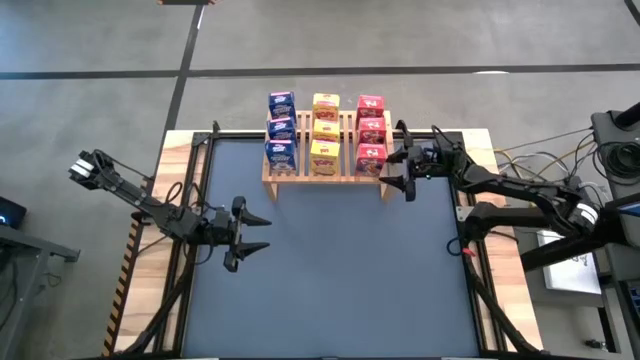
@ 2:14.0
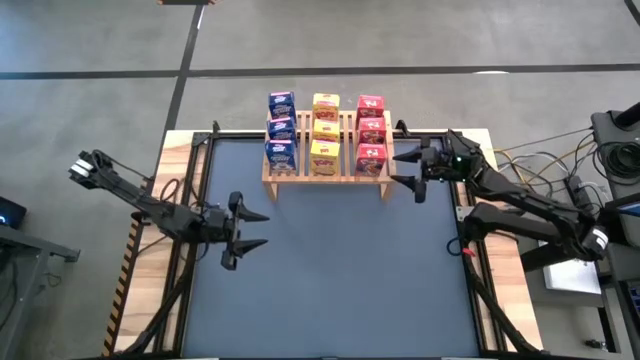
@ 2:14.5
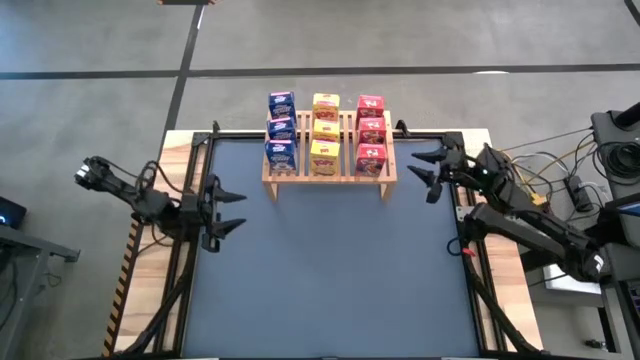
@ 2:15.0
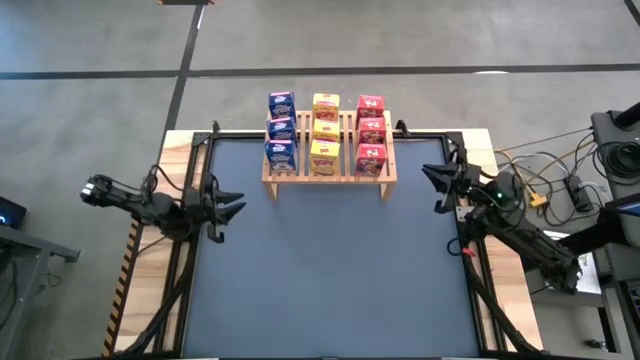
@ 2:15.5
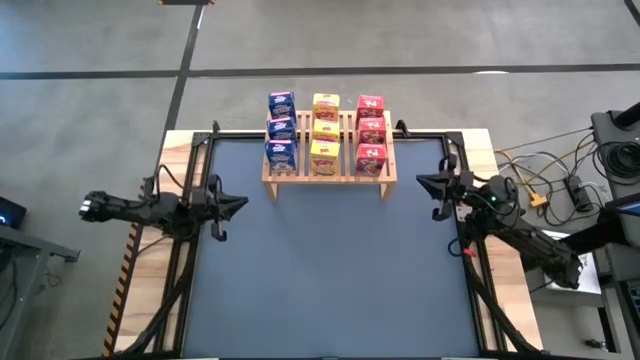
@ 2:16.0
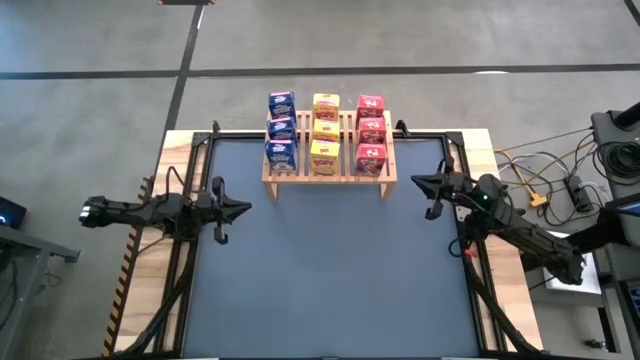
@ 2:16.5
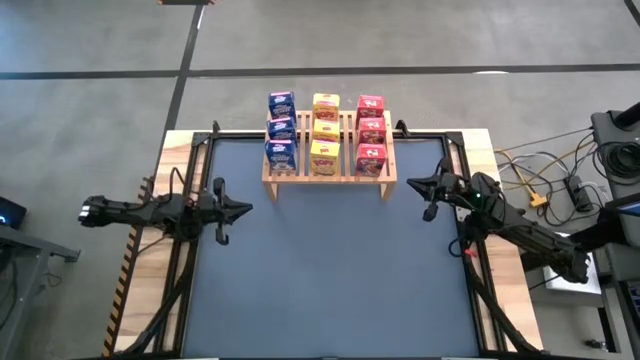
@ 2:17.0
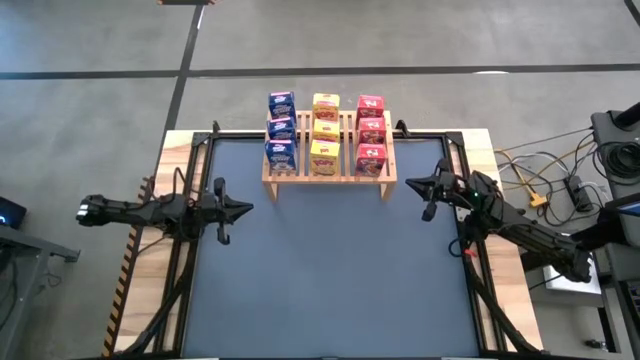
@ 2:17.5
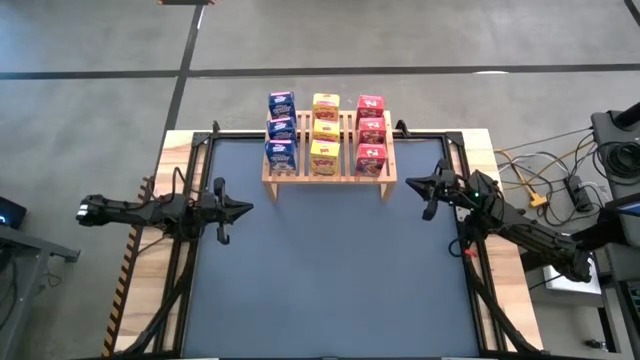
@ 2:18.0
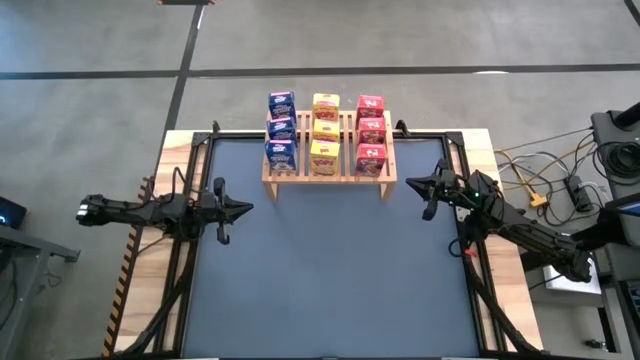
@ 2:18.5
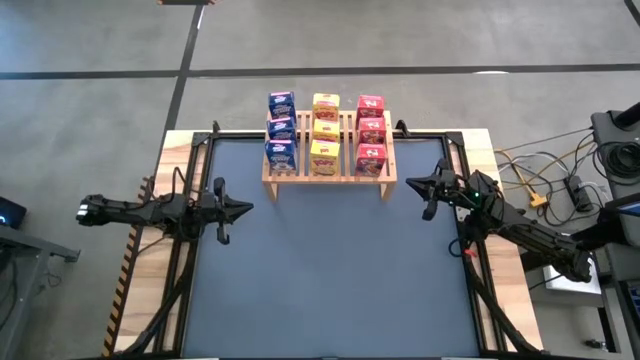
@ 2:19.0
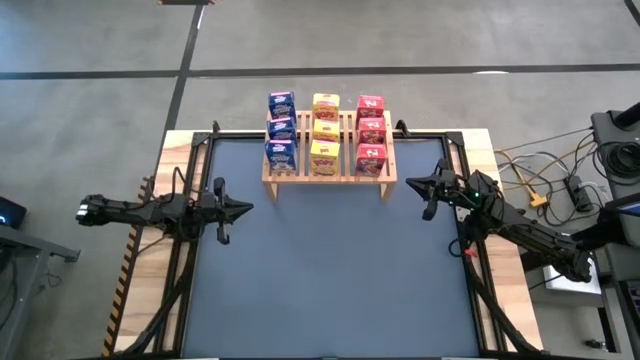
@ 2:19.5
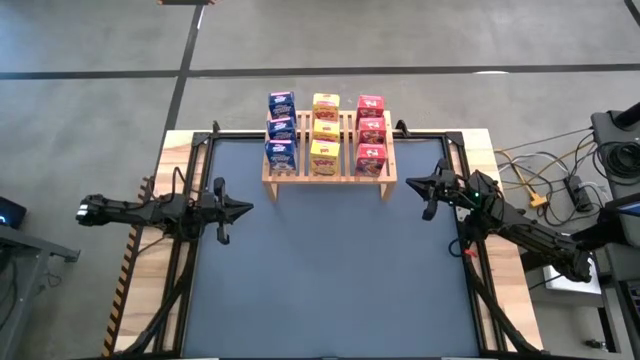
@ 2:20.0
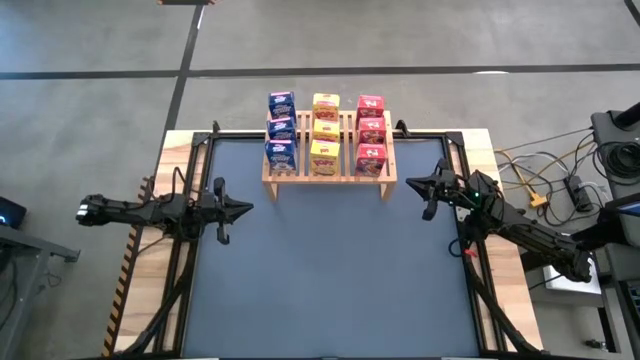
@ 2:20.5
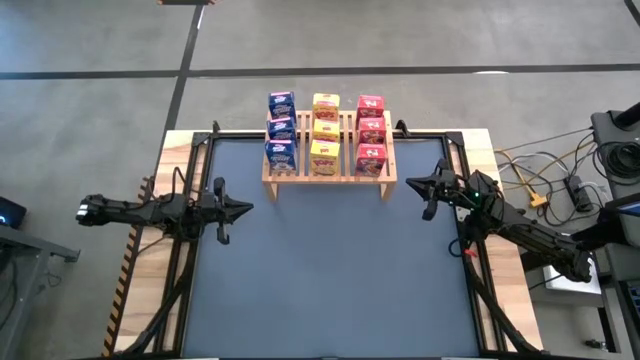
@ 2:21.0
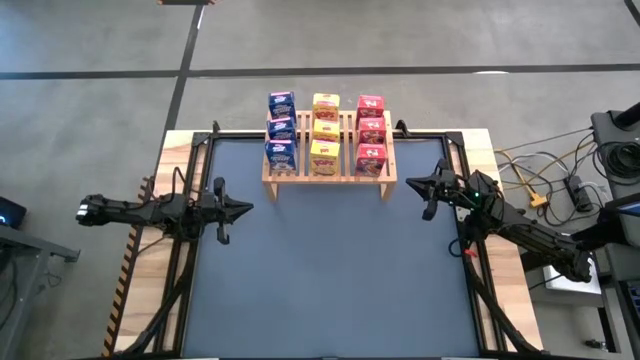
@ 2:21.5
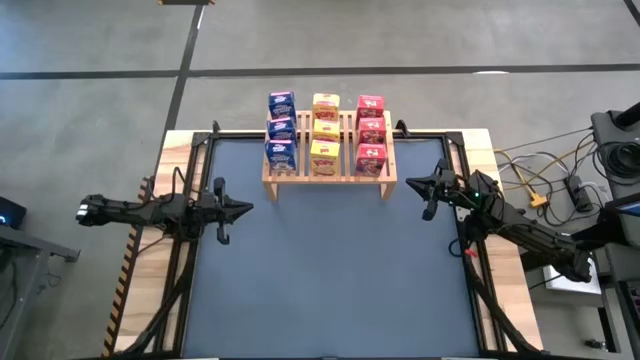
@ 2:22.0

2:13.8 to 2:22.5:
Task: Stack cereal on shelf
Return to Home Position

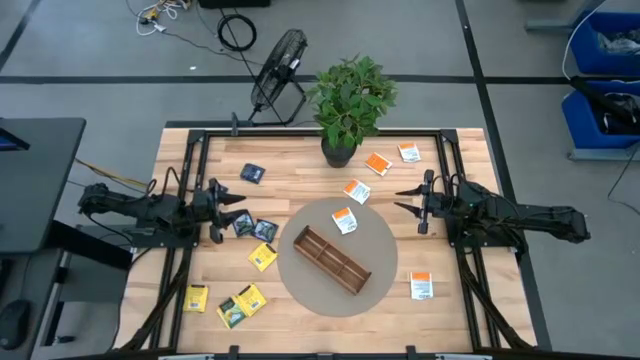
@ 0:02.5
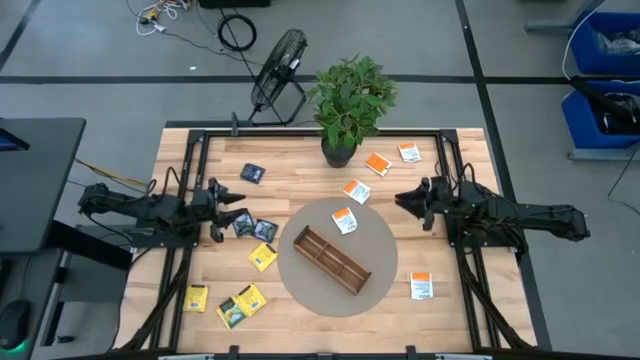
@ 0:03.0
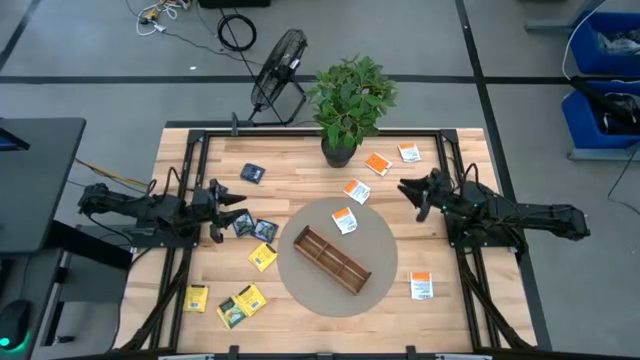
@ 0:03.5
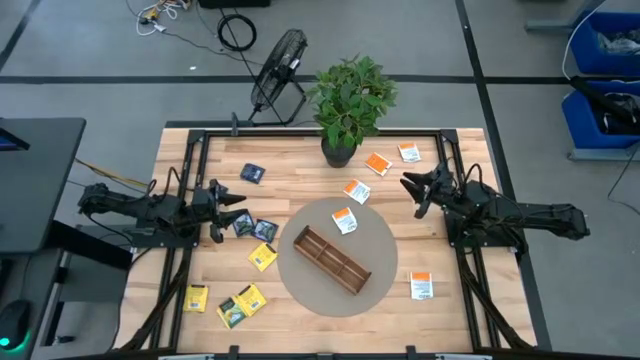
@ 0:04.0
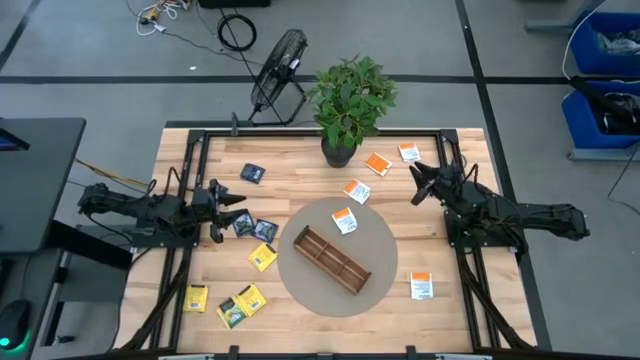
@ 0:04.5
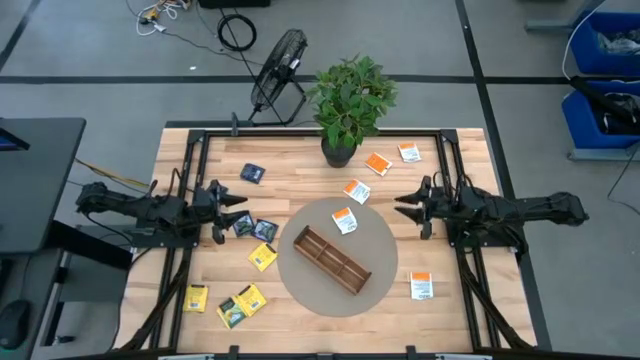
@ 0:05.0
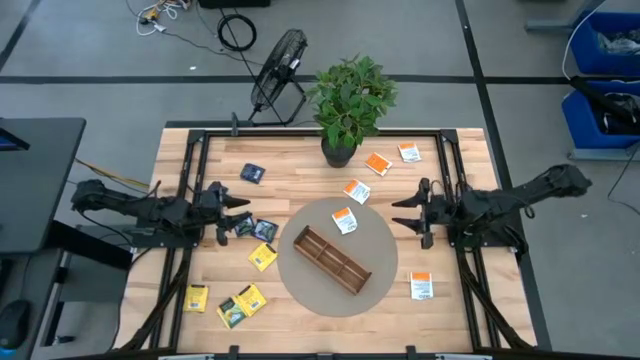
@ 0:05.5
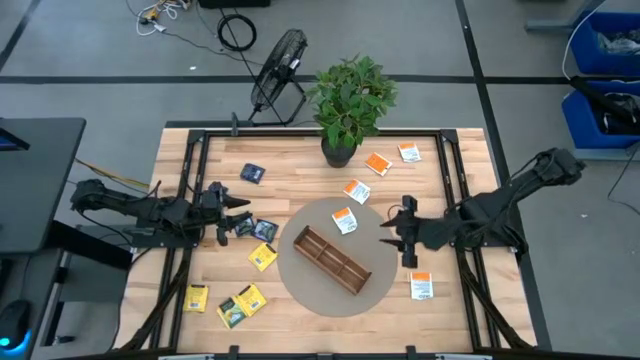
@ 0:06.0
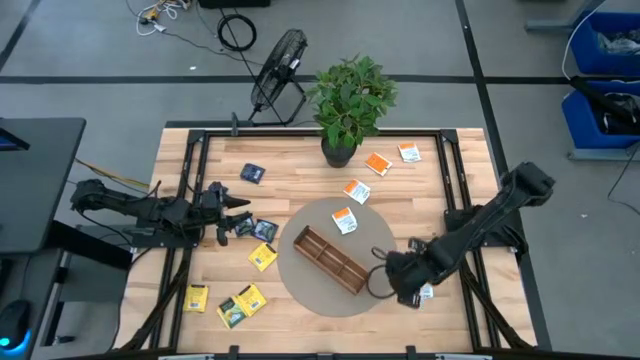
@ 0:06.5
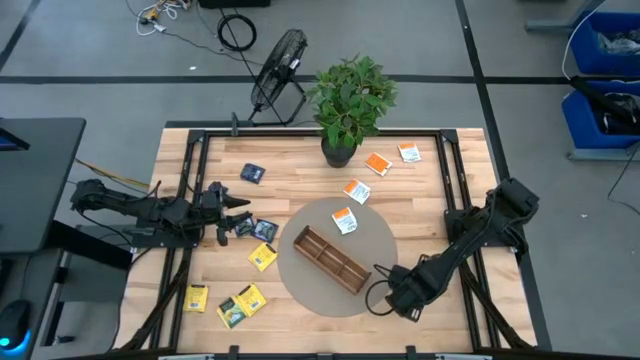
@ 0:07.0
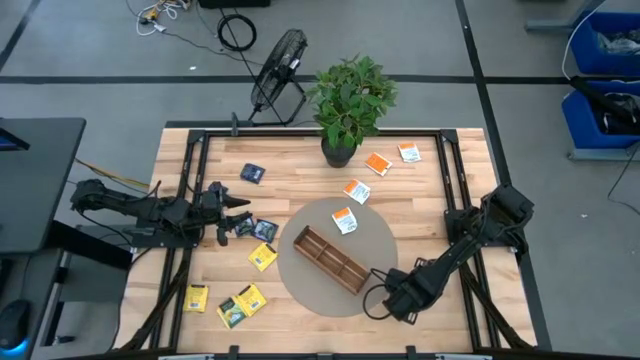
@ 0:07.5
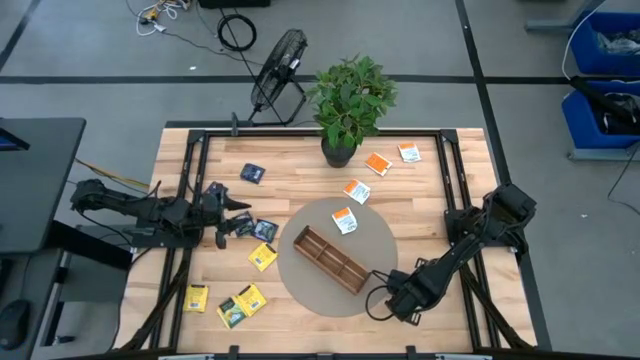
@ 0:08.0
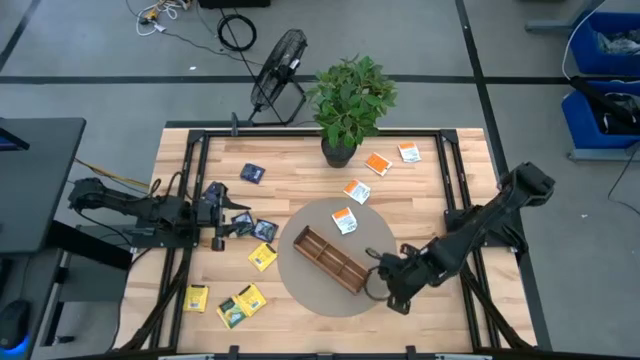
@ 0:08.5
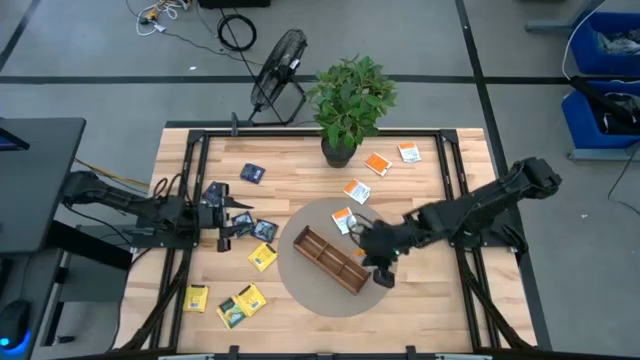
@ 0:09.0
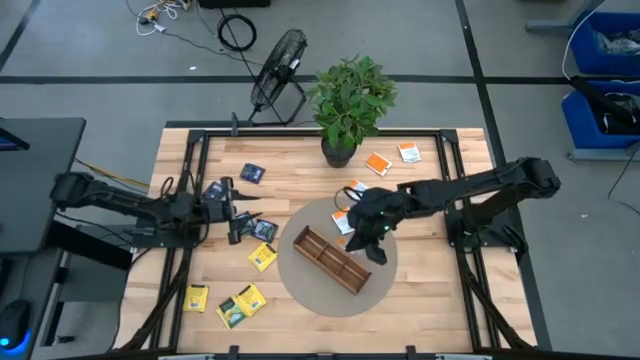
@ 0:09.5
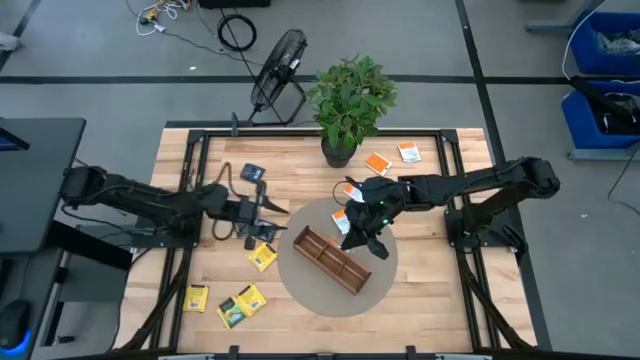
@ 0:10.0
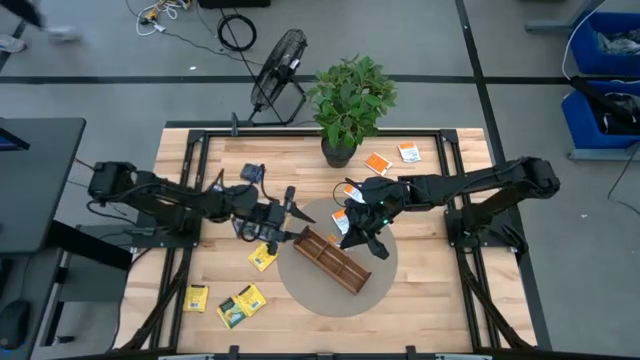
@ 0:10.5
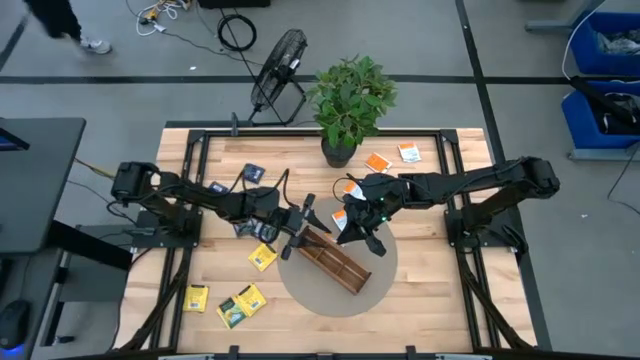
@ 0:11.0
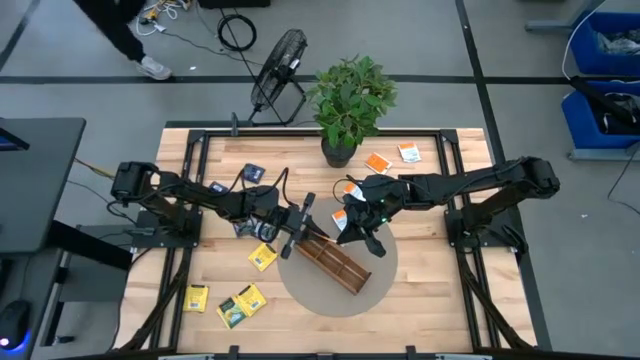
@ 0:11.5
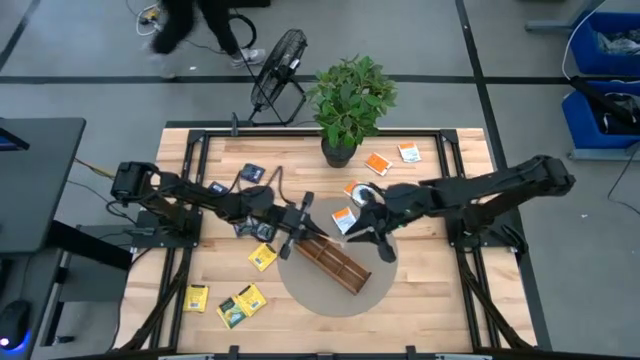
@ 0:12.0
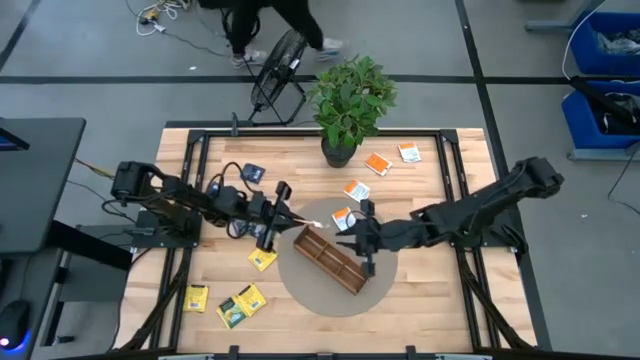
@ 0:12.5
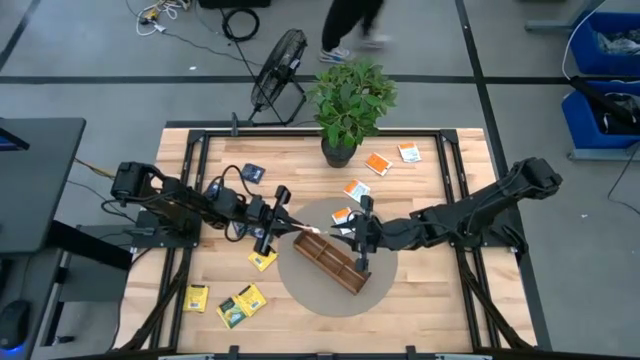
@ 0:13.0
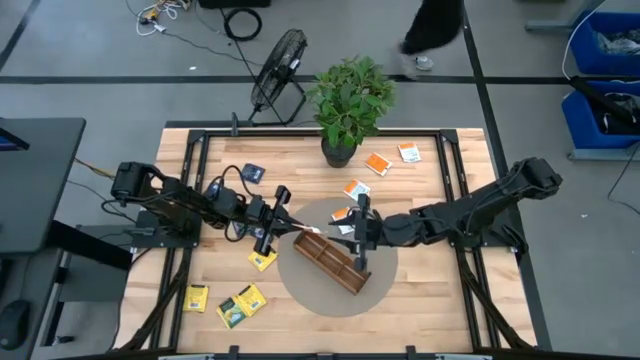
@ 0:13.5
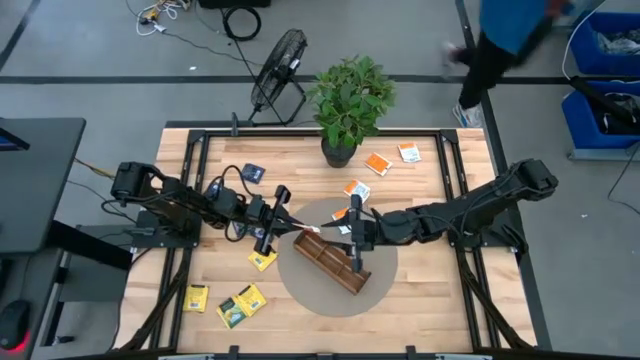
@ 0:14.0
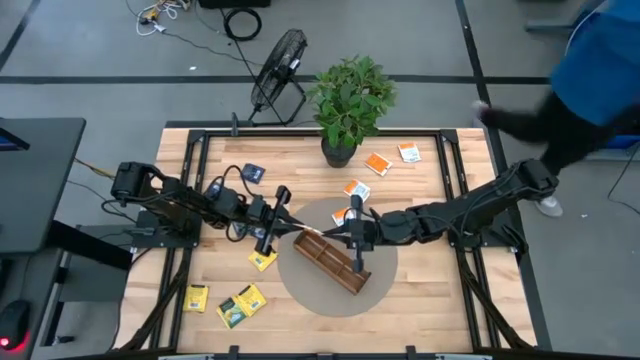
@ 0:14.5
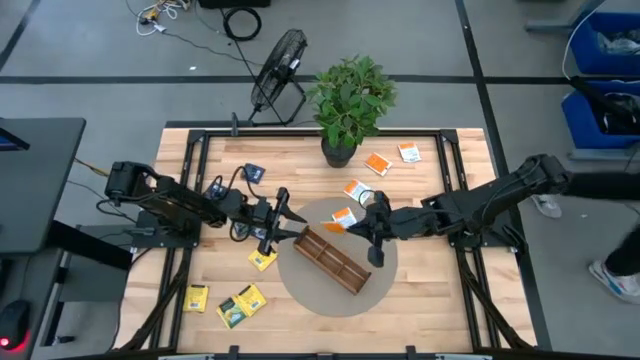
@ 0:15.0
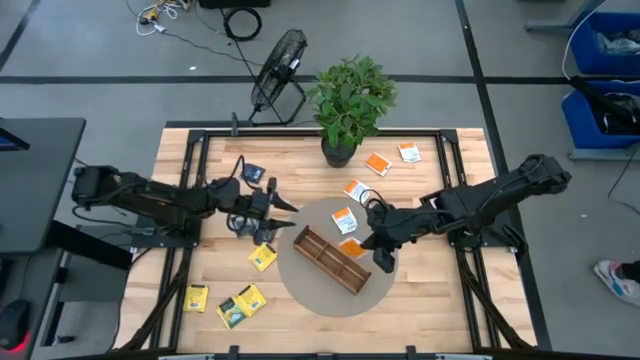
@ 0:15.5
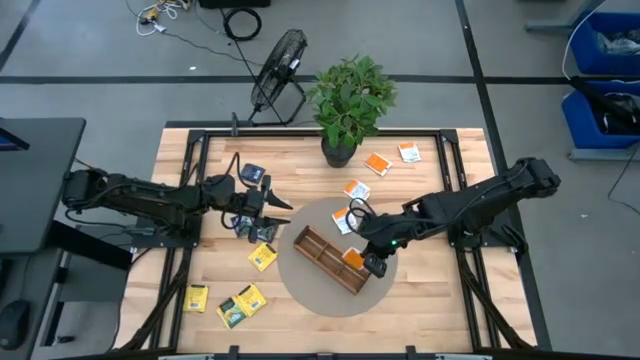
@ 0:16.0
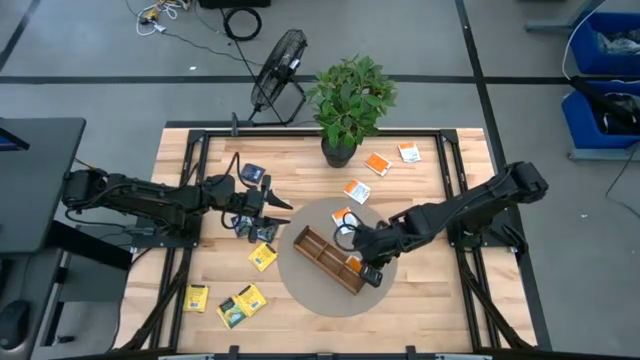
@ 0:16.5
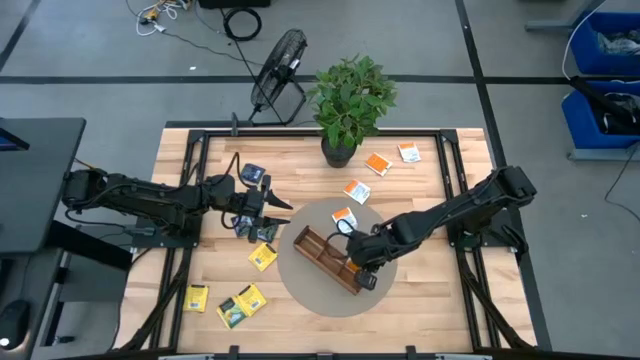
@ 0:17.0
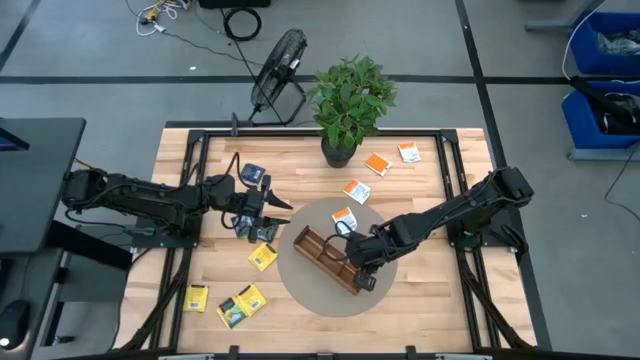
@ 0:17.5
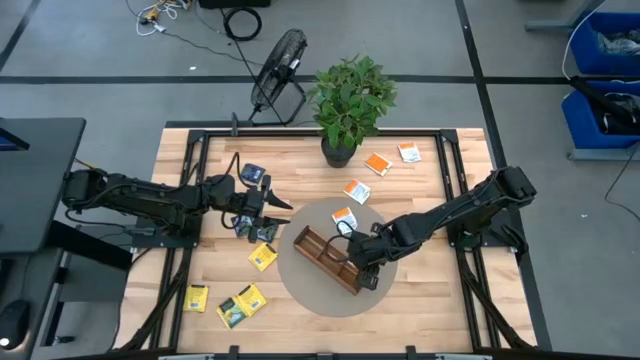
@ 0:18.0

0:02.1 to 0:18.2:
Task: Pick & Place Tea
Put the orange tea bag into the bottom section of the wooden organizer
